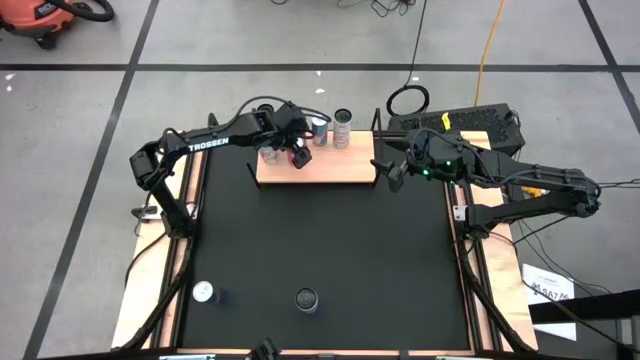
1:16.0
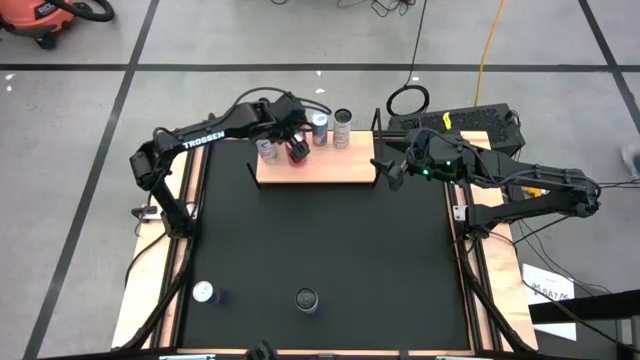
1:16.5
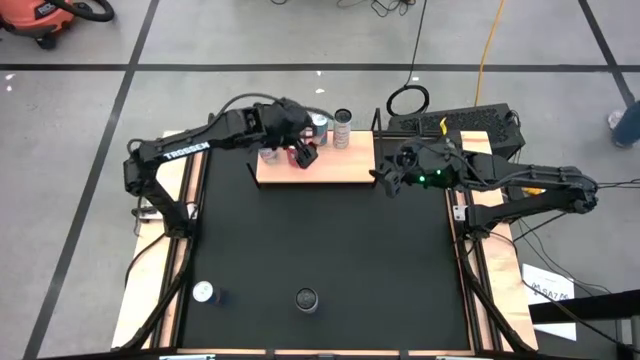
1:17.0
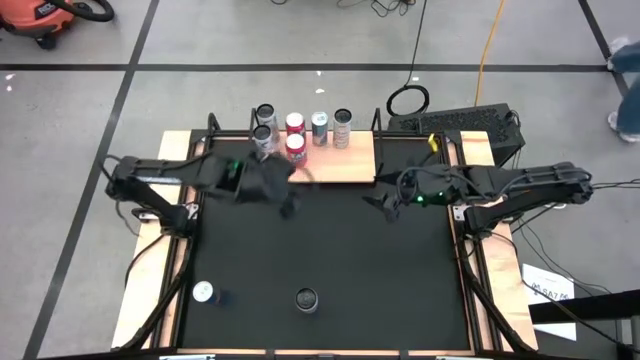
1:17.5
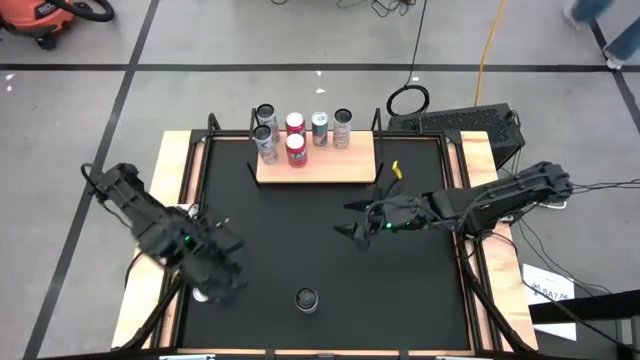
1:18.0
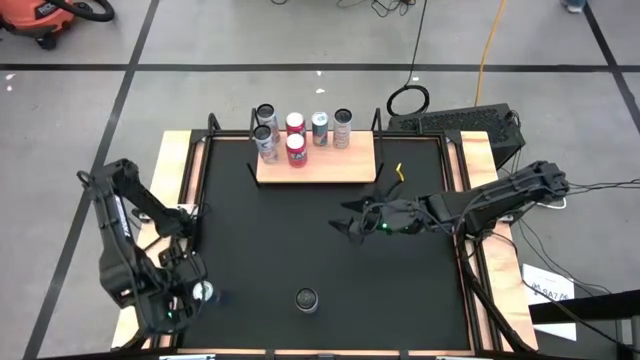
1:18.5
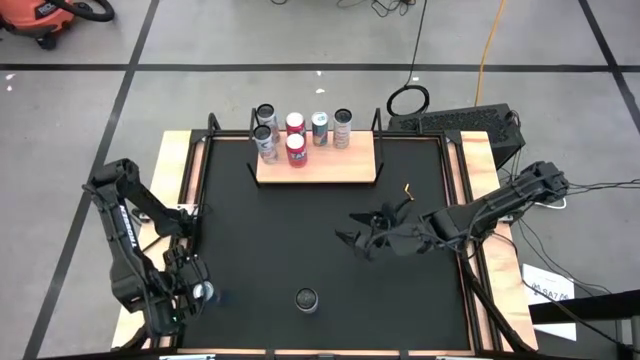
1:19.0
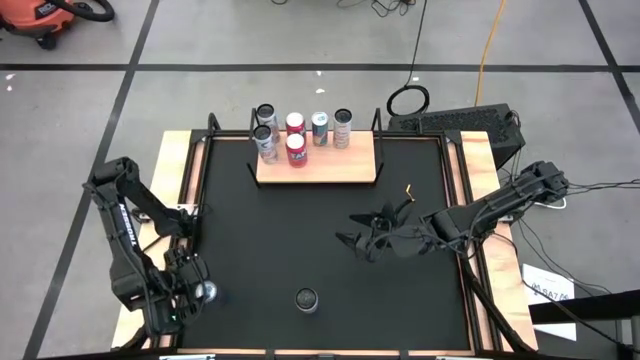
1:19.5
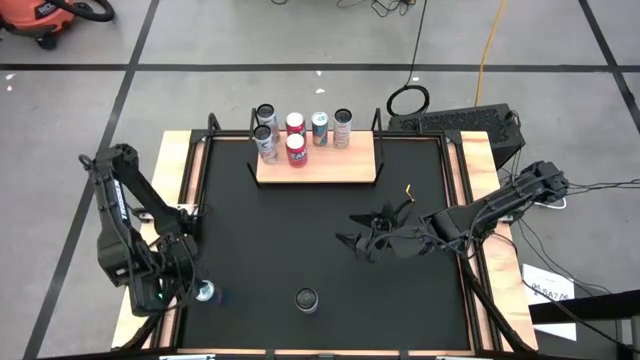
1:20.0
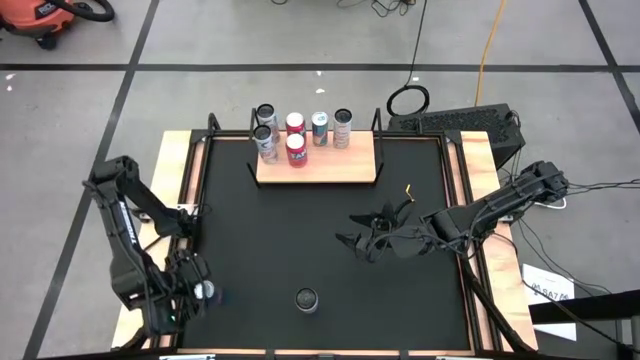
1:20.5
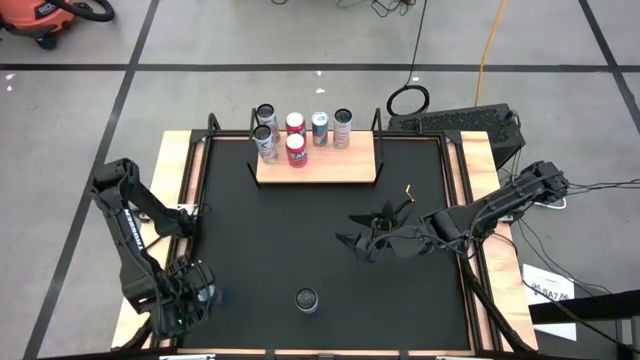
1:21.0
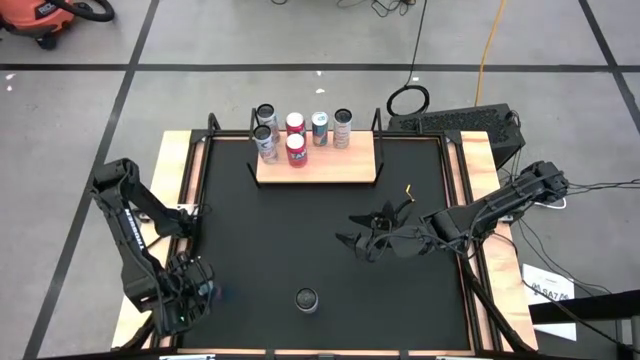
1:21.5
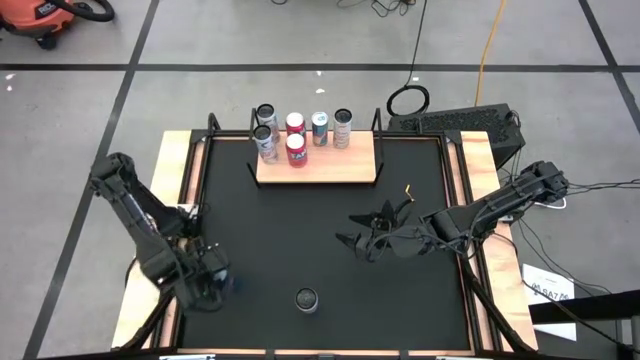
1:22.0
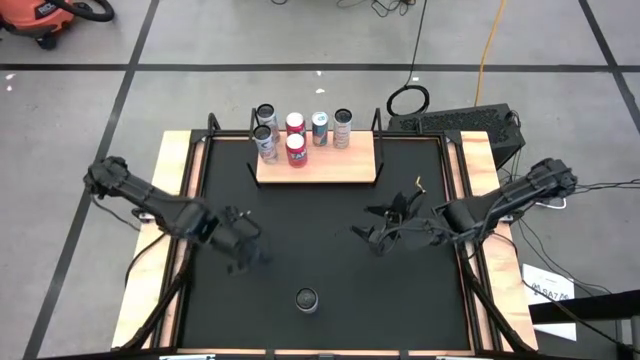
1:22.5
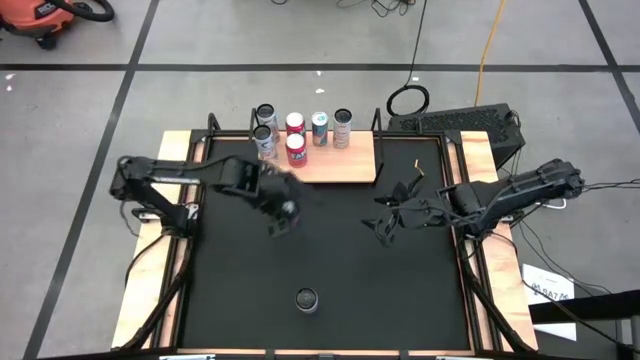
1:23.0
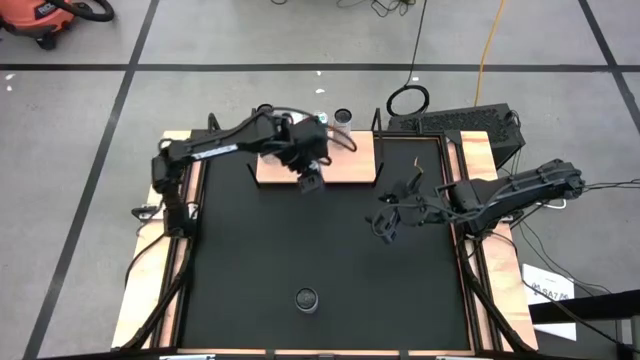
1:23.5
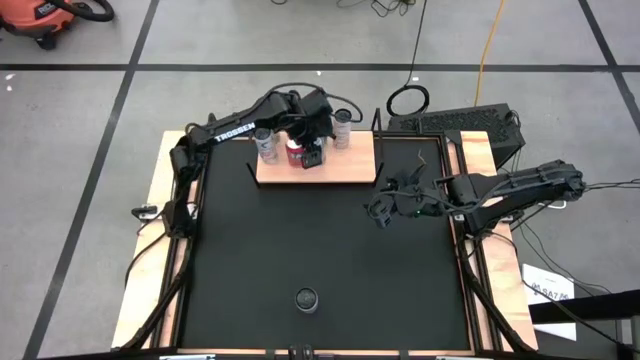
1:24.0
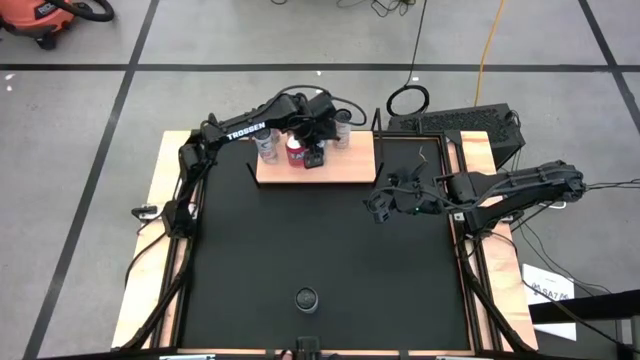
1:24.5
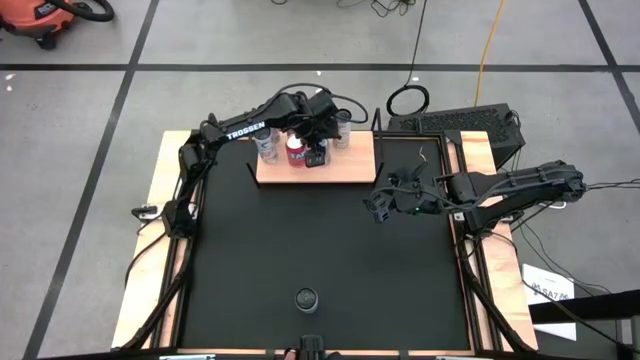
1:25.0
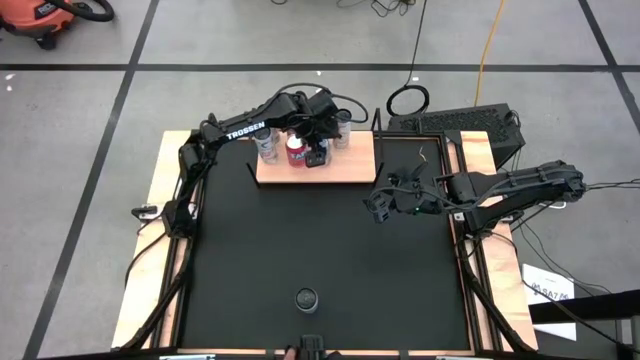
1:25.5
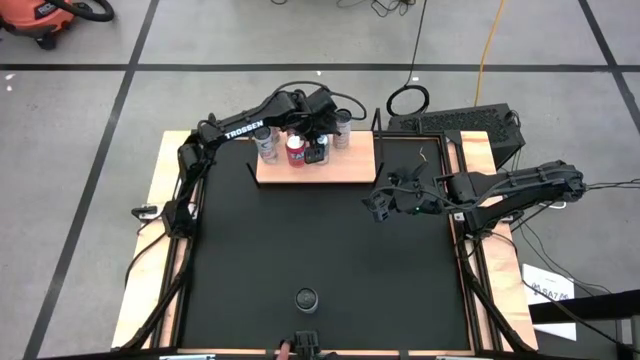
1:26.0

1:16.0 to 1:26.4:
Task: Place canned beverage on shelf
Put the blue soda can aligned with the other blue soda can on the shelf

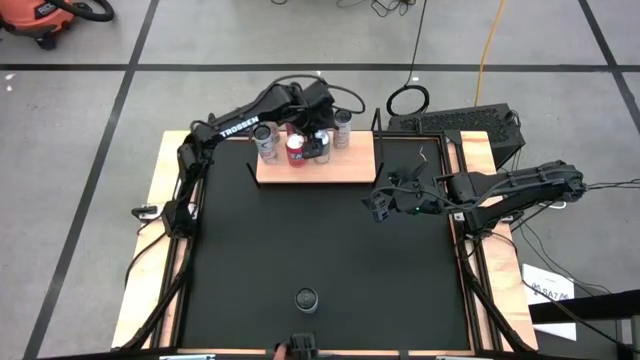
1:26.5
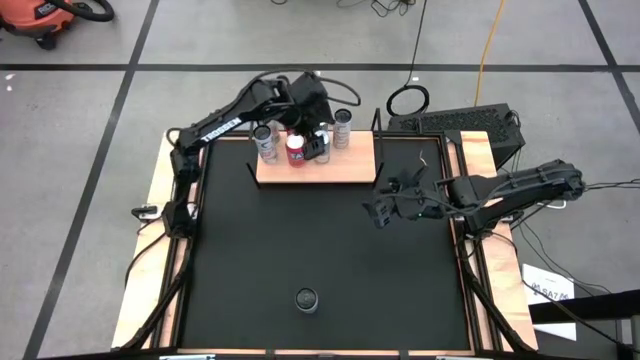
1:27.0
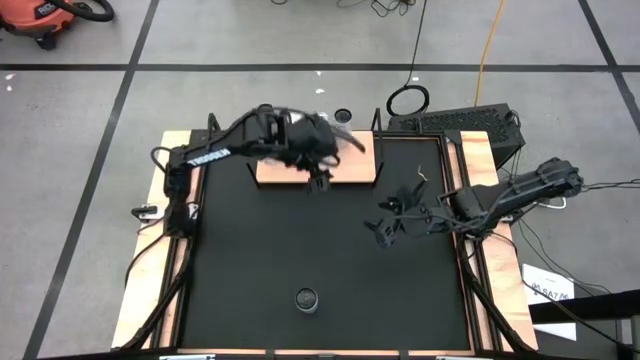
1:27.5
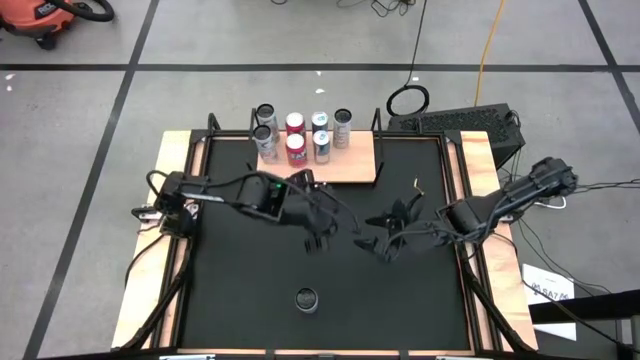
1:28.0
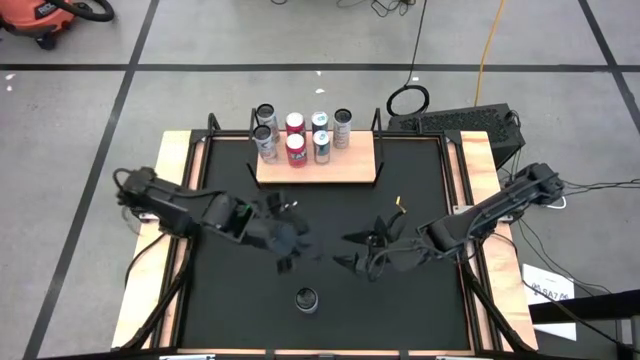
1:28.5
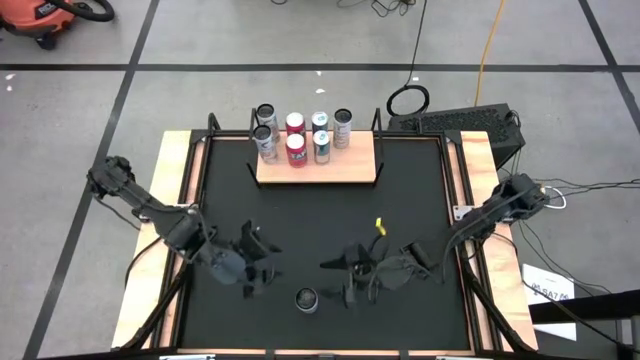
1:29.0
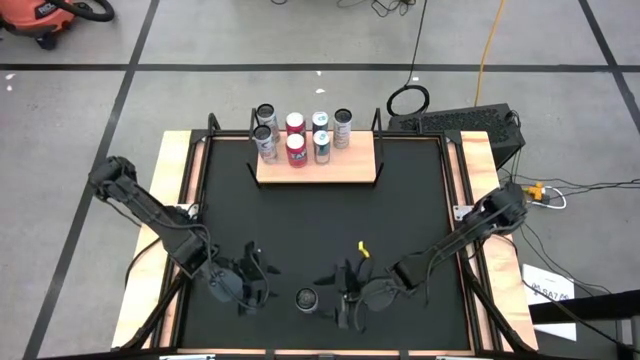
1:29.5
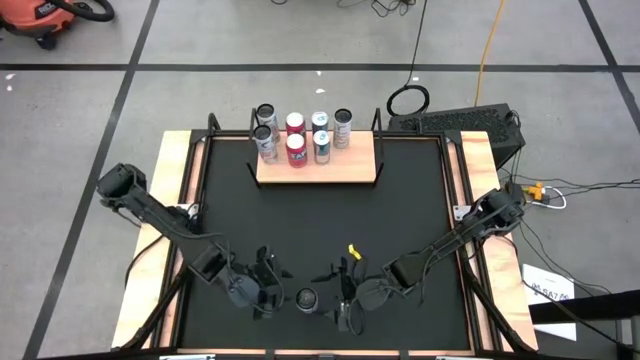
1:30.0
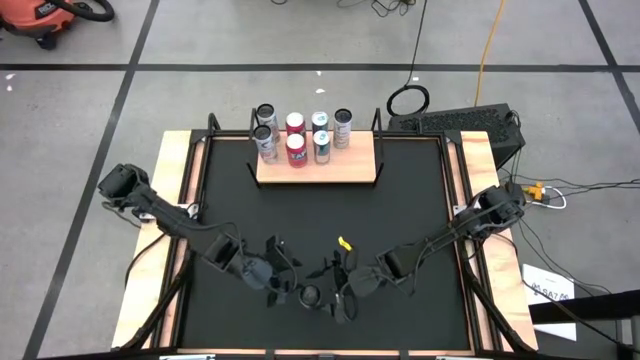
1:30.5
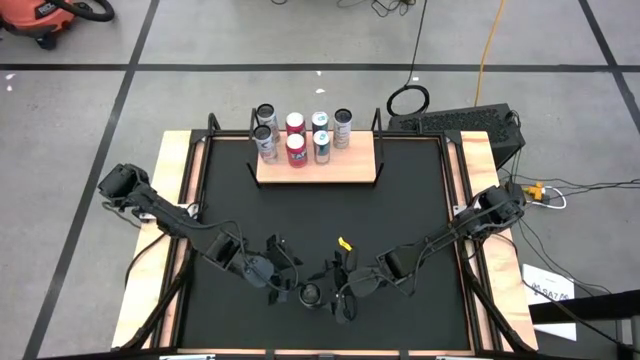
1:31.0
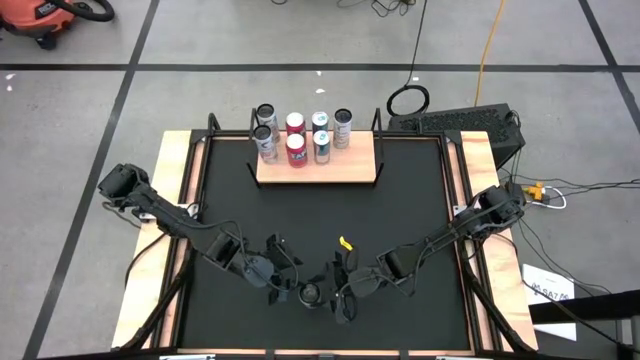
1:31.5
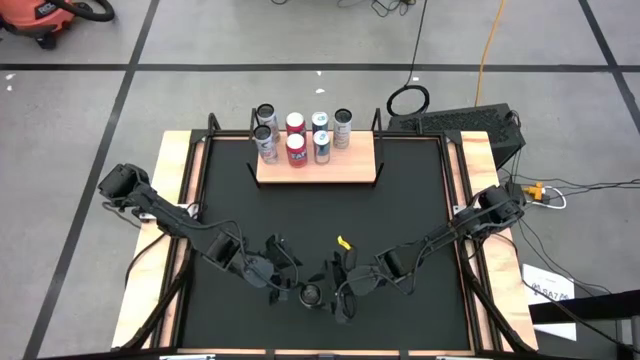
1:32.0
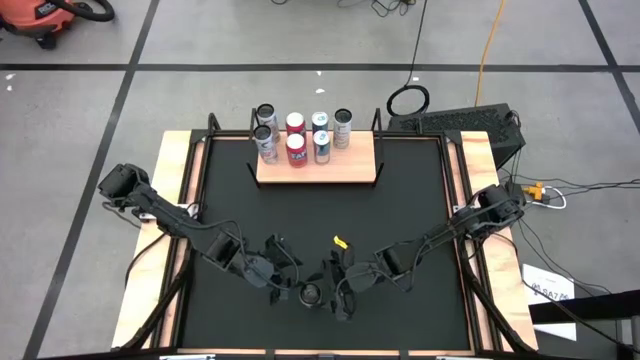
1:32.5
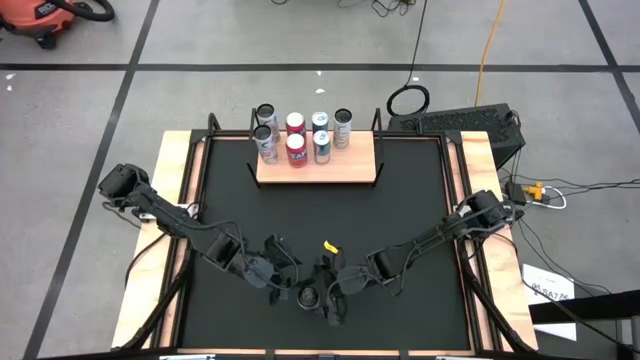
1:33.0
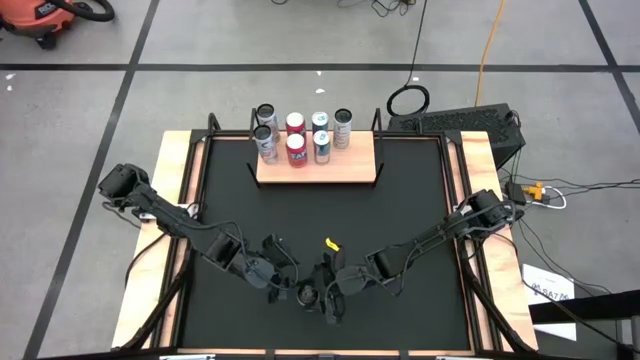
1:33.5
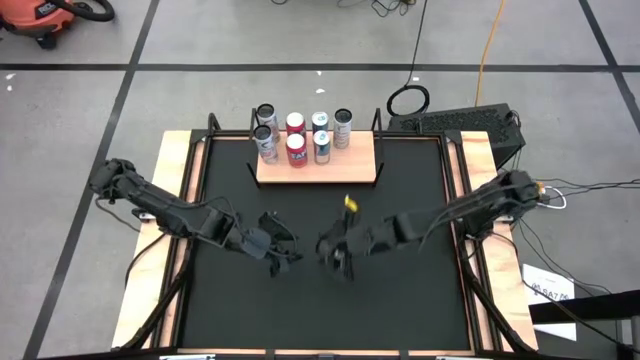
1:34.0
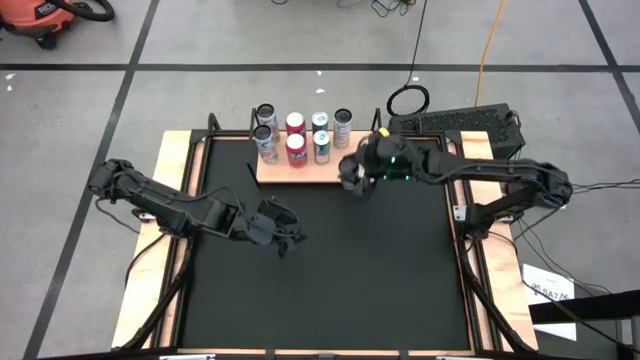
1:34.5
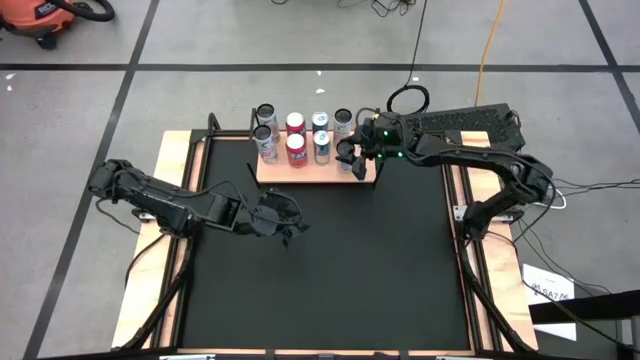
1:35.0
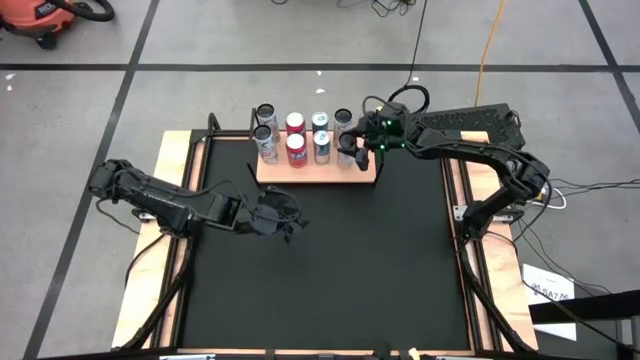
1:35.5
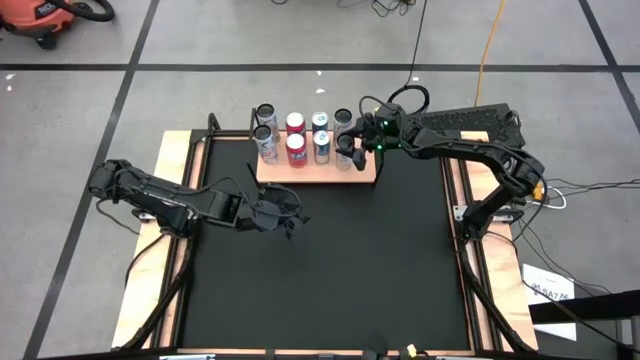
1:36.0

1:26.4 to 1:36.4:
Put the white-yellow soda can aligned with the other white-yellow soda can on the shelf
